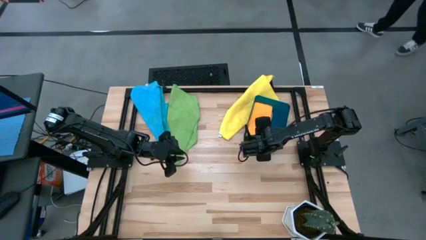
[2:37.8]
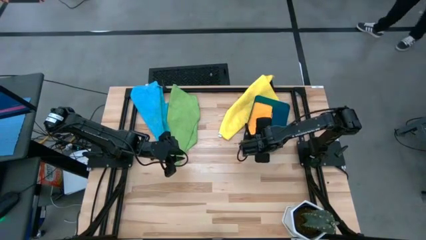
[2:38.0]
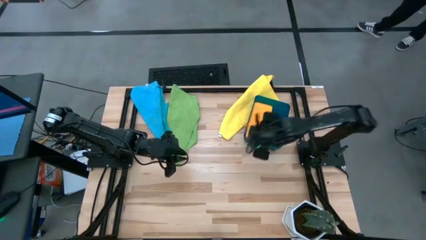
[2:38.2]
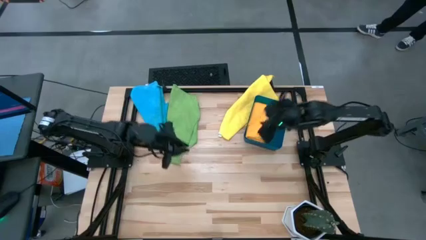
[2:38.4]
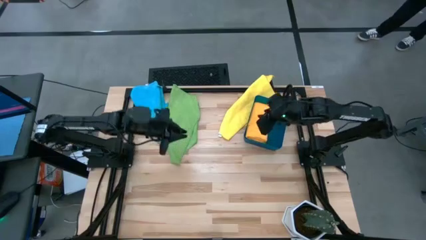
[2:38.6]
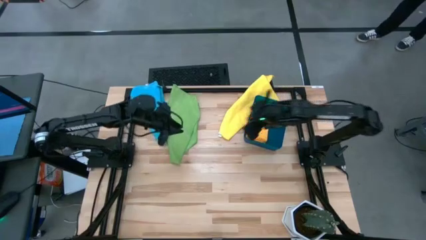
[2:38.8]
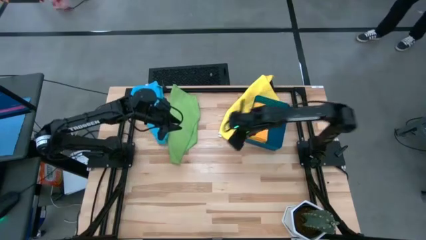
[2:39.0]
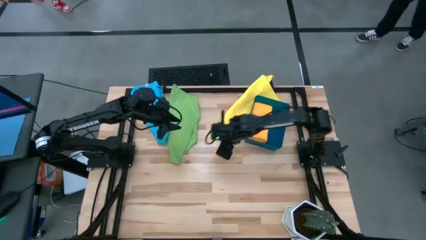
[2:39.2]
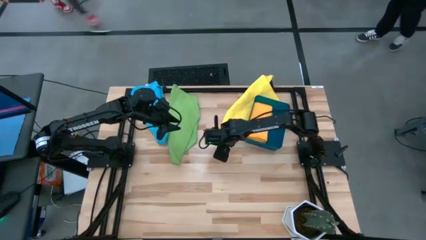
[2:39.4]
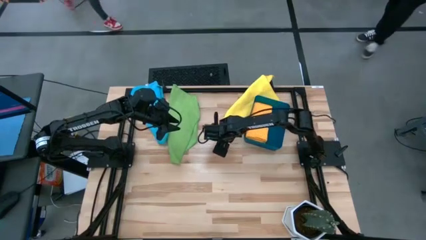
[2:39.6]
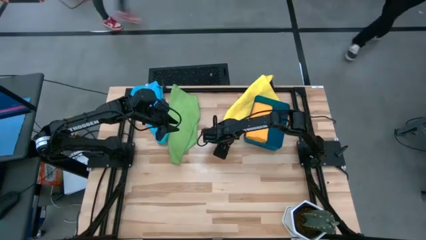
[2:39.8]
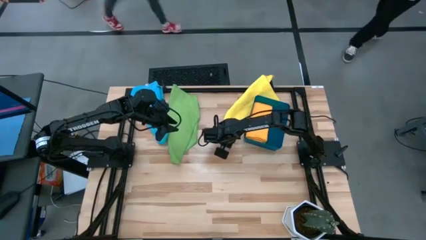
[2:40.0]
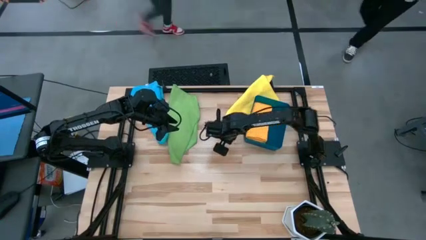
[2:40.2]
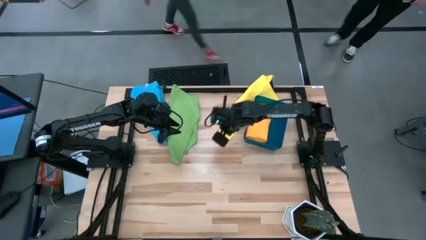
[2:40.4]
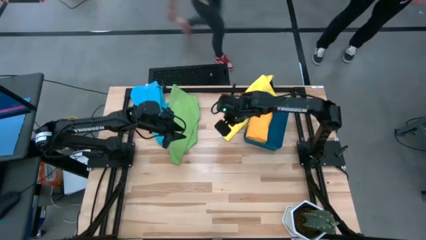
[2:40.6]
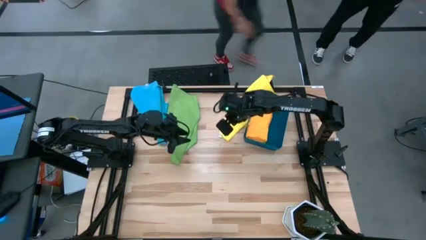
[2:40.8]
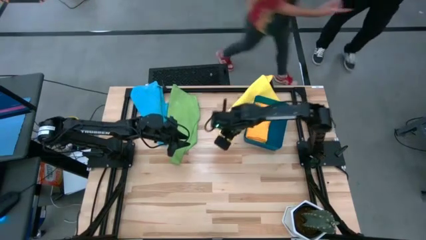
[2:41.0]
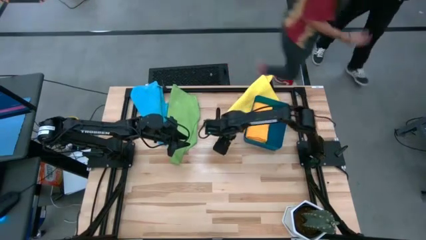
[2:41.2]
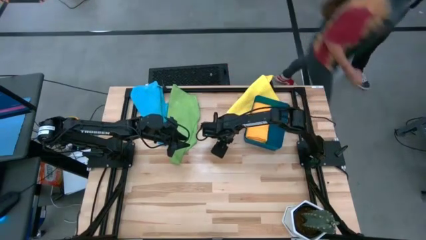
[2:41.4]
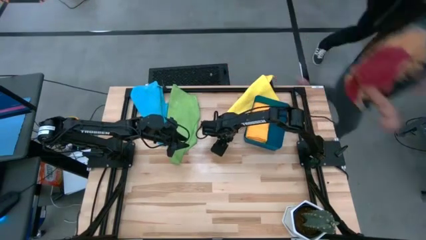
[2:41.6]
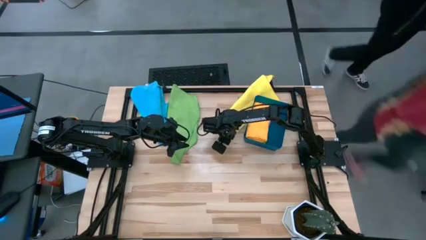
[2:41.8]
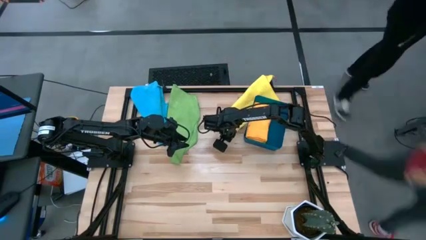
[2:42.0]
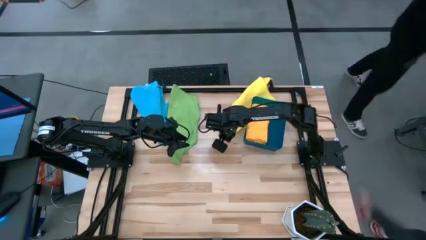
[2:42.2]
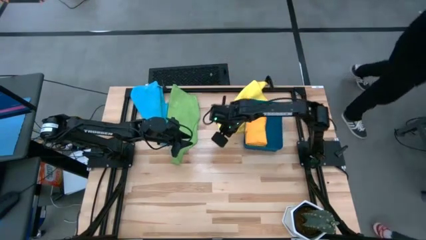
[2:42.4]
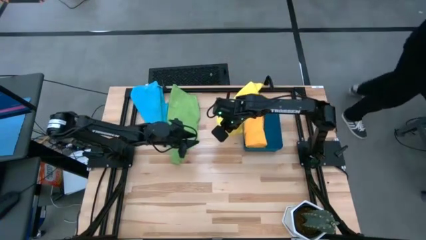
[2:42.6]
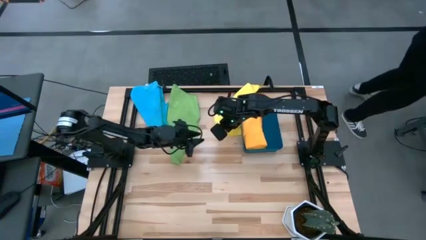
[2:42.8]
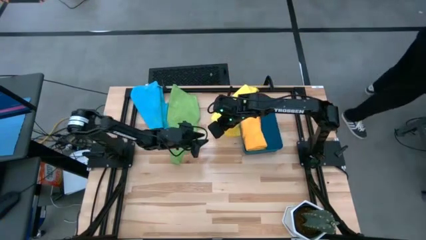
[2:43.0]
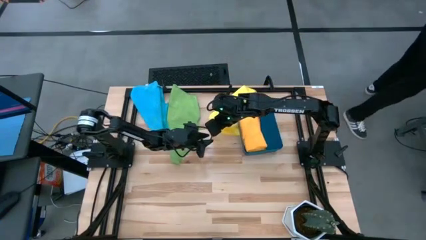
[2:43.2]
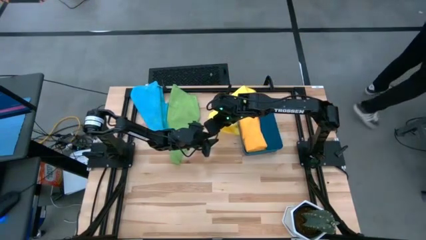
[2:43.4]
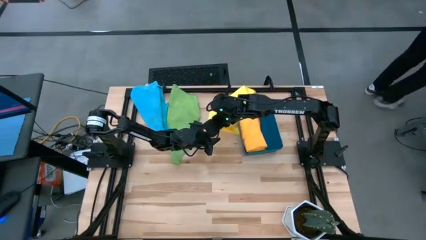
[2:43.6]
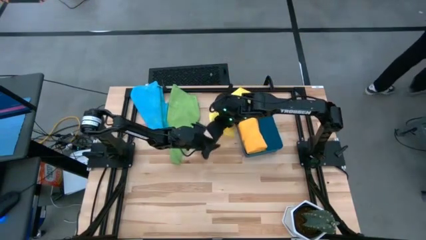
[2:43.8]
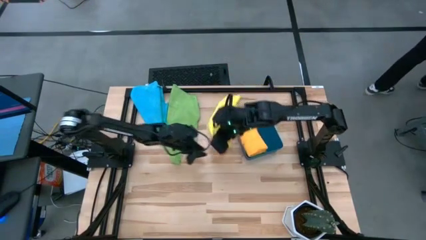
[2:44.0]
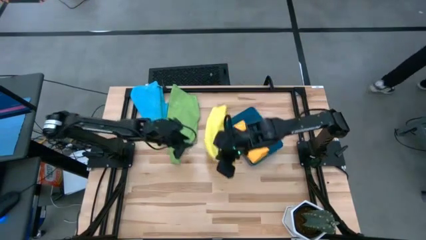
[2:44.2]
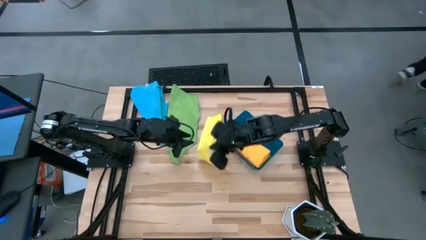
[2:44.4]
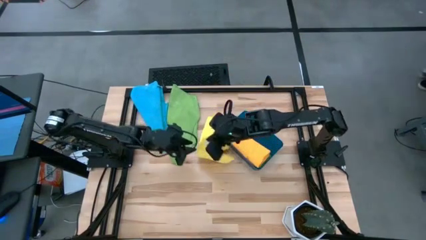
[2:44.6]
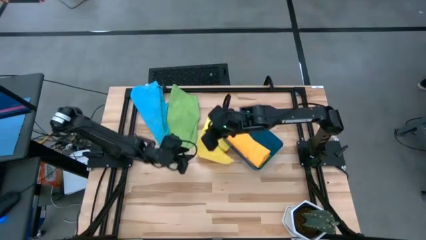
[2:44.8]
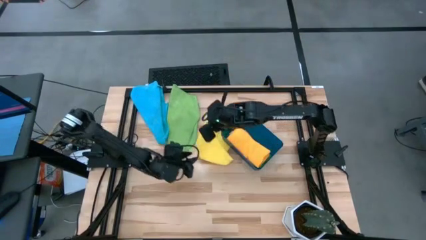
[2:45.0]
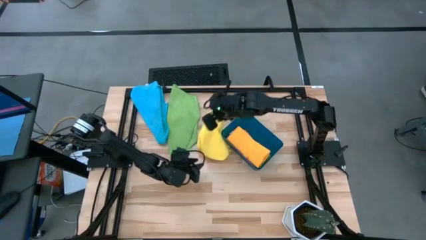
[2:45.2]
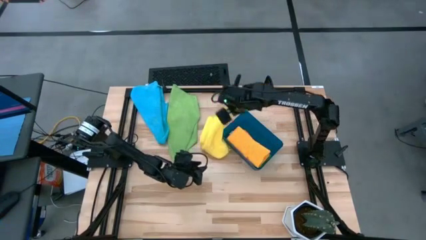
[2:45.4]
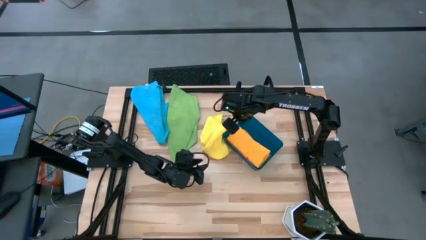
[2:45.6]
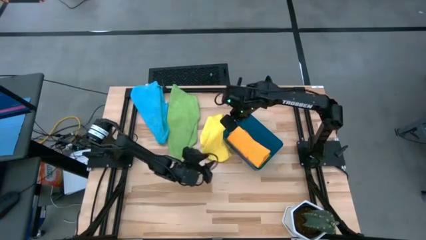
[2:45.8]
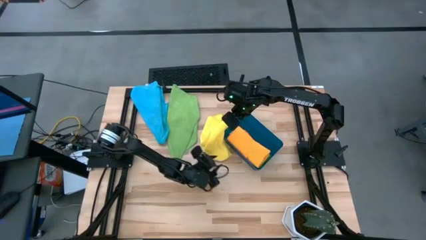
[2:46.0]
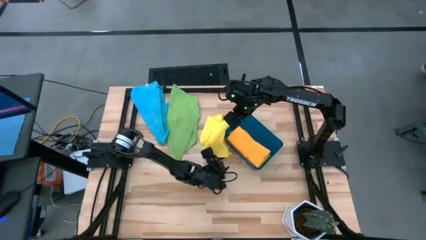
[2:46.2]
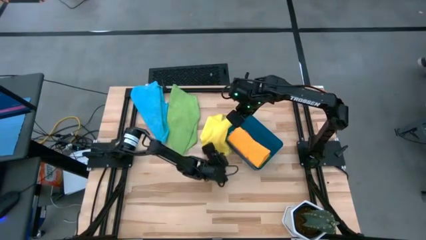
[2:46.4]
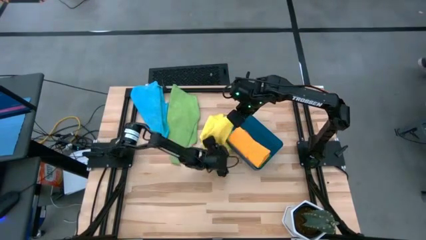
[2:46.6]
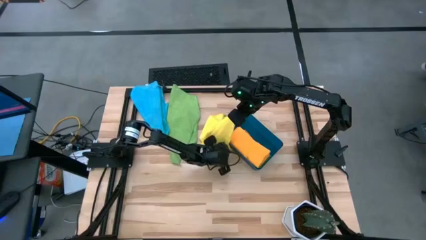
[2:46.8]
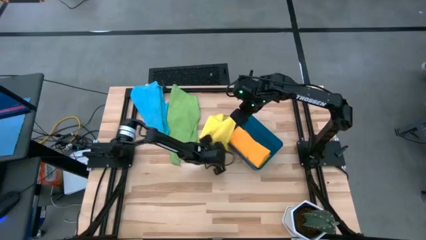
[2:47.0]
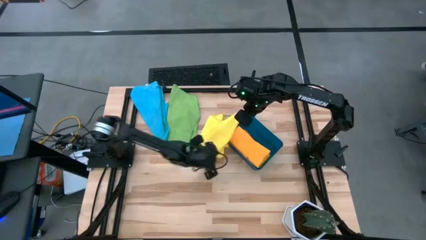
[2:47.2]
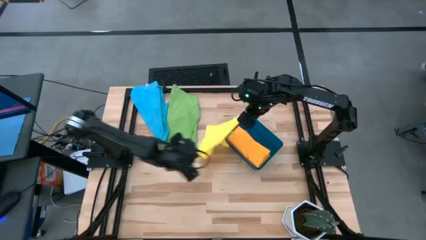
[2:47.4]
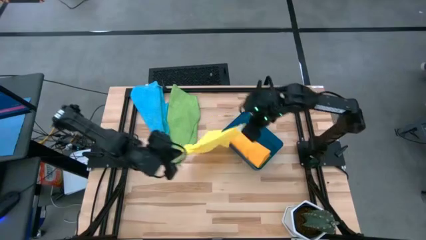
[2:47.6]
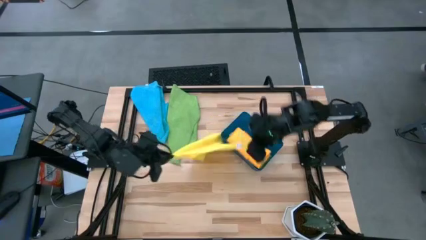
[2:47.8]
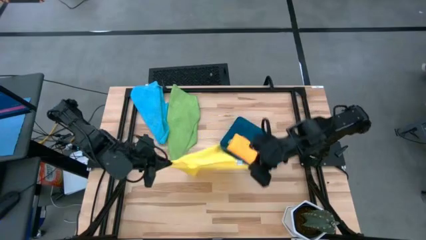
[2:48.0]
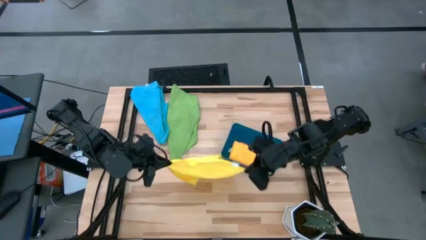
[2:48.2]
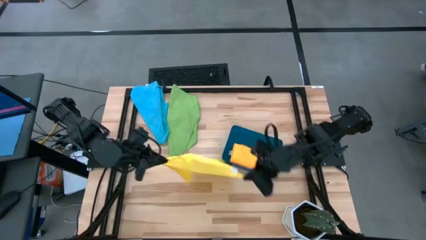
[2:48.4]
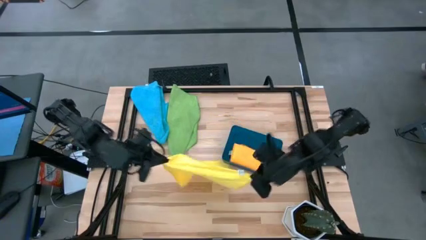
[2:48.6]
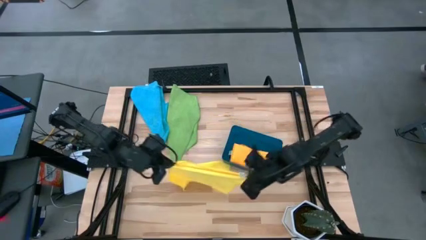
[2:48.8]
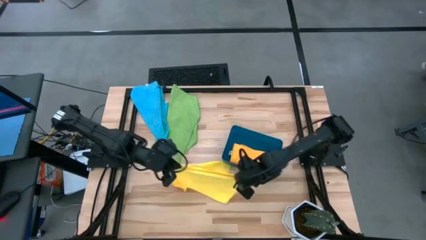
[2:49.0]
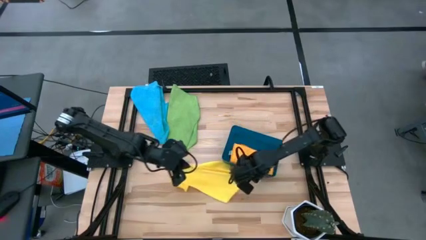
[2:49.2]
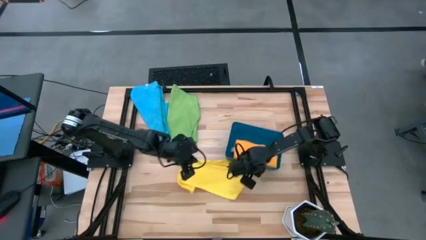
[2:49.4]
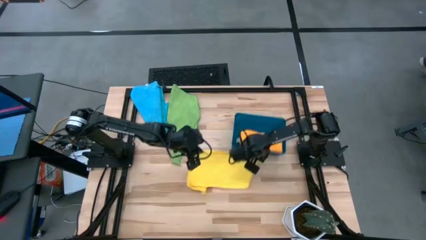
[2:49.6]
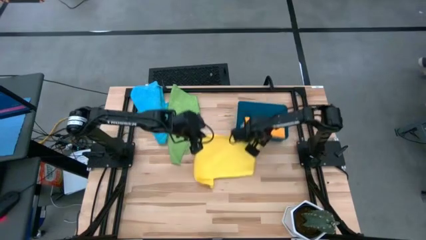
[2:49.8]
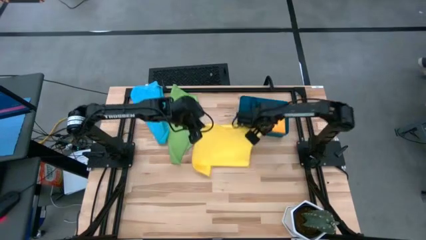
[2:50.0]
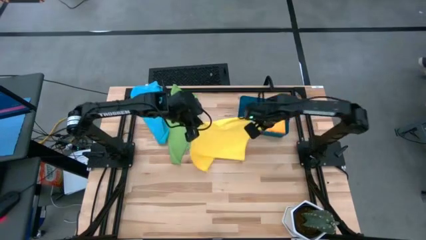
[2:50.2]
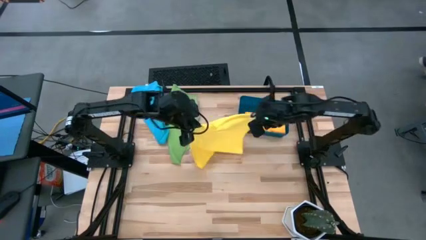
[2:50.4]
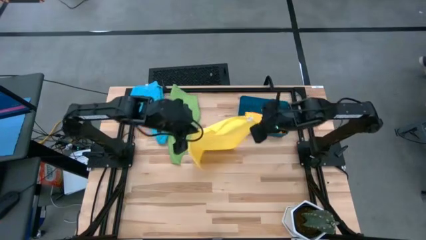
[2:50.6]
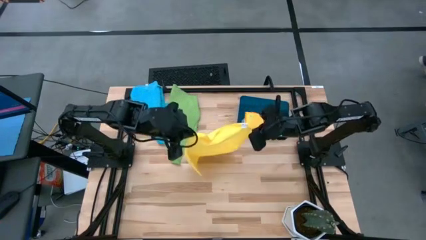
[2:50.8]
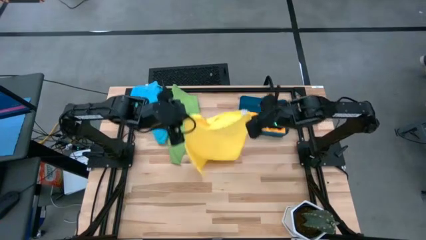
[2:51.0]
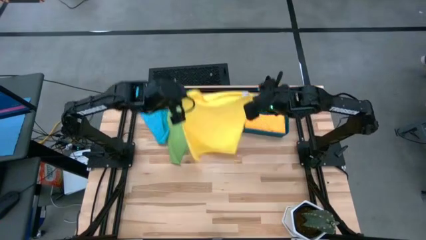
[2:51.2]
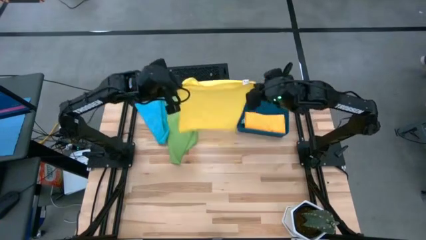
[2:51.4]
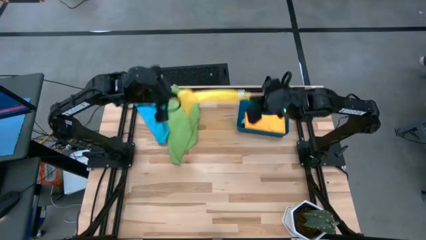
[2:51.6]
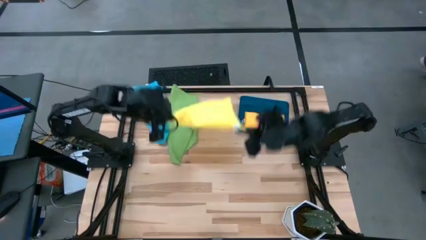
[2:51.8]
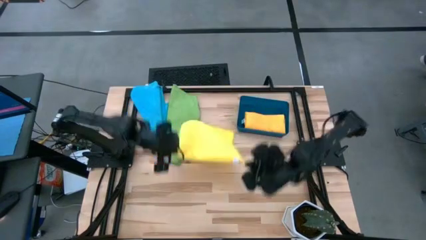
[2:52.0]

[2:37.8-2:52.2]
Task: Fold microfiber towels
Fold the yellow microfiber cloth

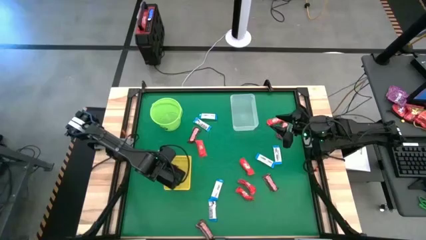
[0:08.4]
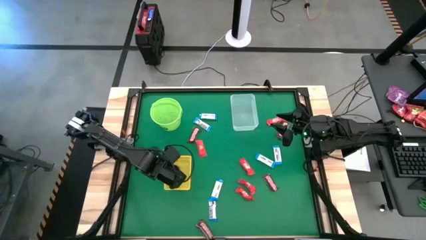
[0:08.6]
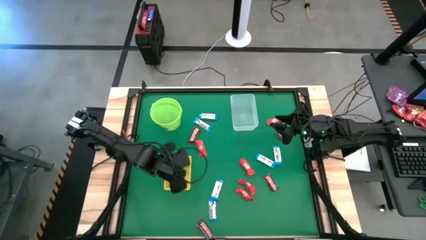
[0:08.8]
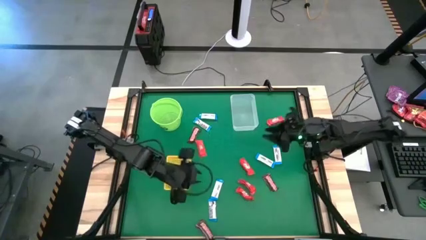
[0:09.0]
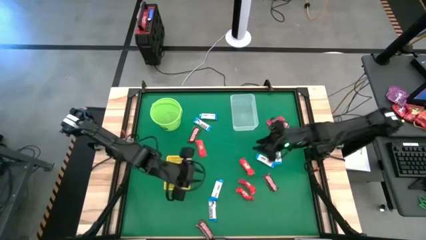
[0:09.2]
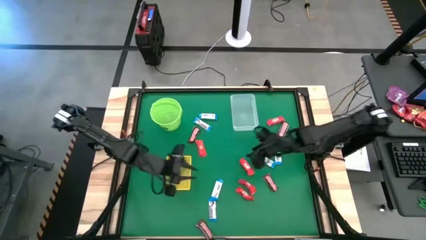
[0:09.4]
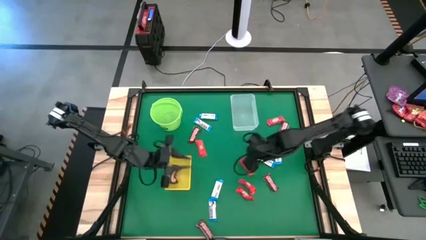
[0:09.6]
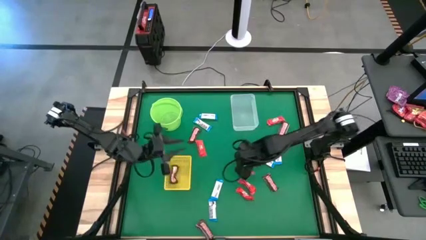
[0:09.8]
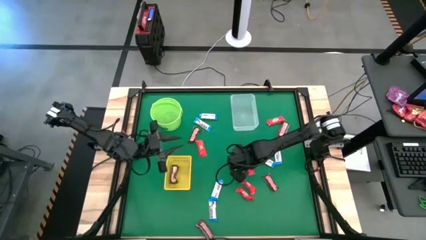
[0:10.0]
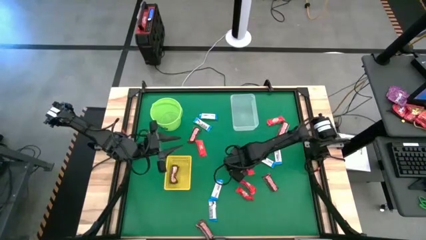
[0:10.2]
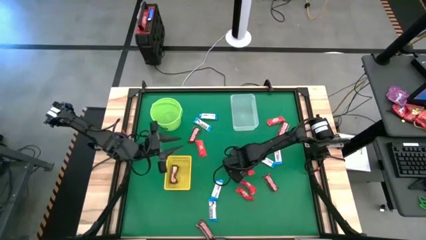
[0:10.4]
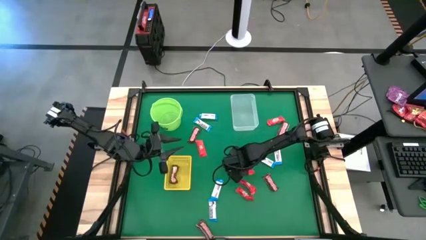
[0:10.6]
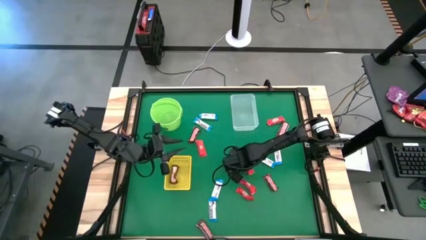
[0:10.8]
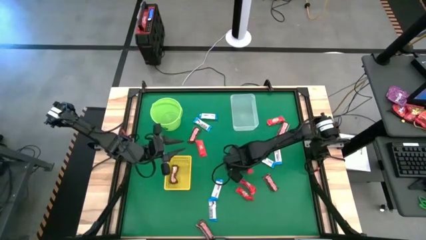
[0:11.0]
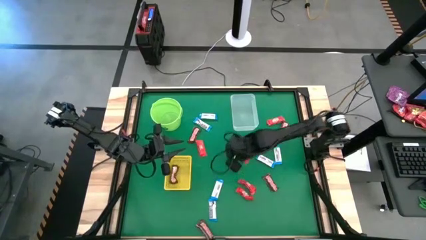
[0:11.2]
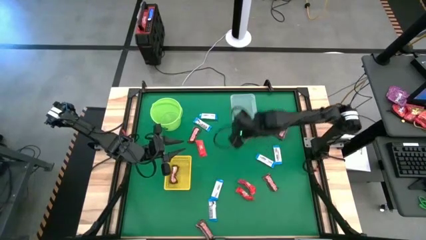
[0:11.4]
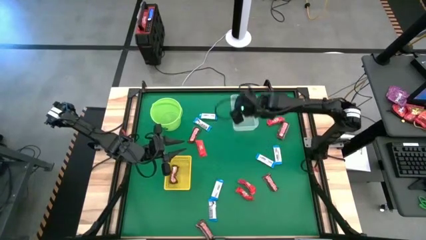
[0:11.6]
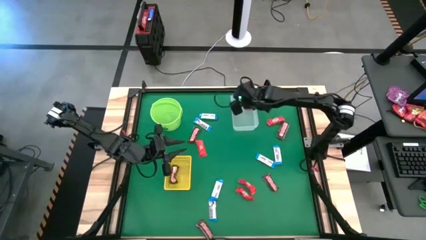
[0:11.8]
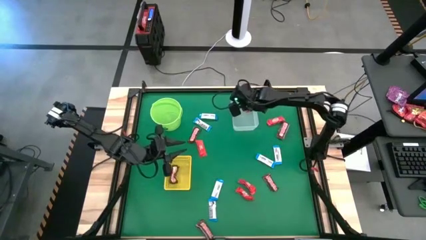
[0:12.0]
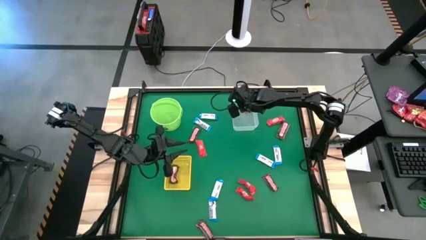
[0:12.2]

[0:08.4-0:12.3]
Task: Sort candy by brand, put in halloween buckets
Put the red chocolate into the transparent bin
